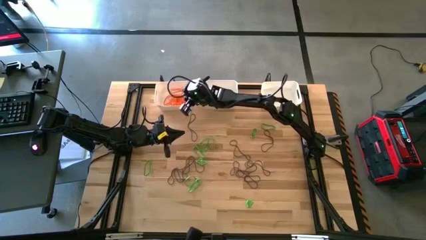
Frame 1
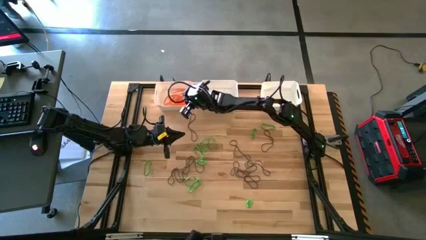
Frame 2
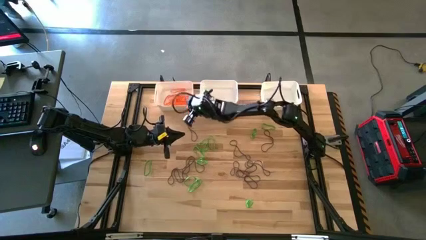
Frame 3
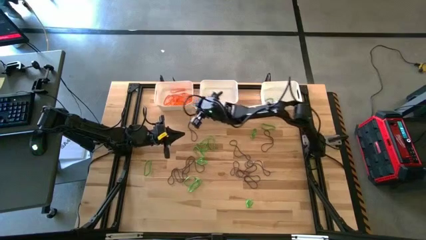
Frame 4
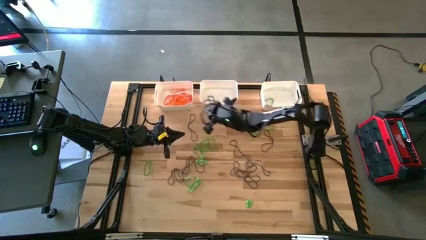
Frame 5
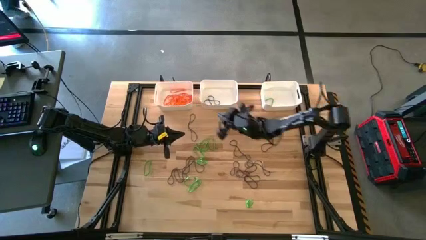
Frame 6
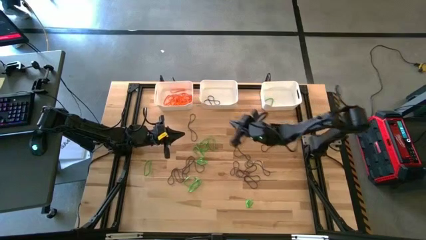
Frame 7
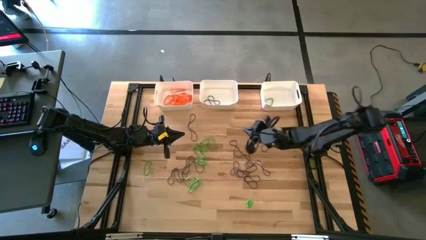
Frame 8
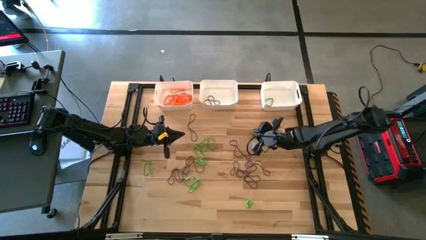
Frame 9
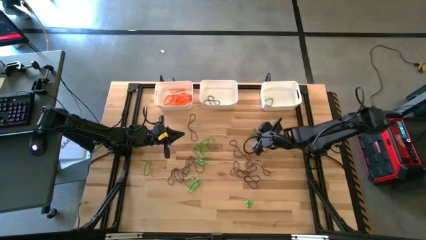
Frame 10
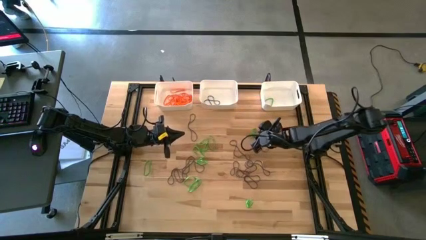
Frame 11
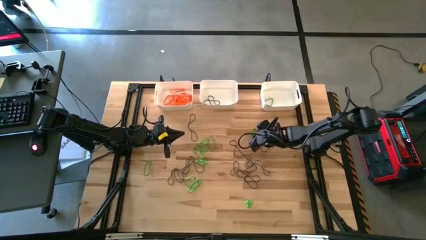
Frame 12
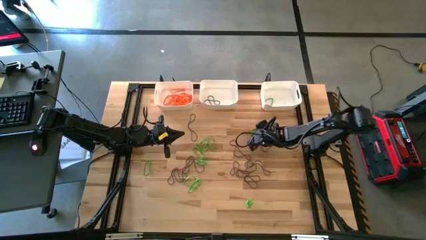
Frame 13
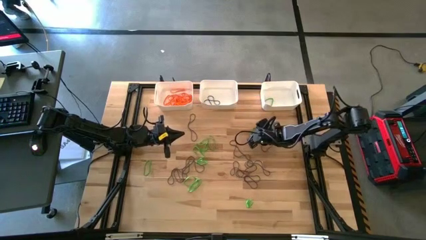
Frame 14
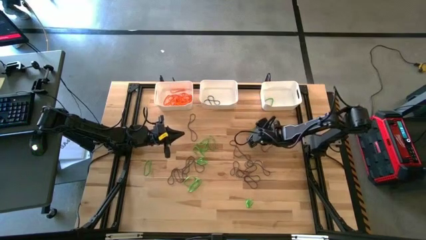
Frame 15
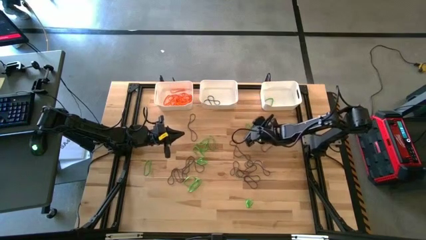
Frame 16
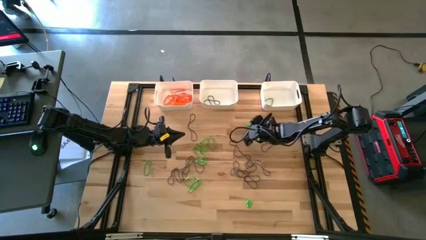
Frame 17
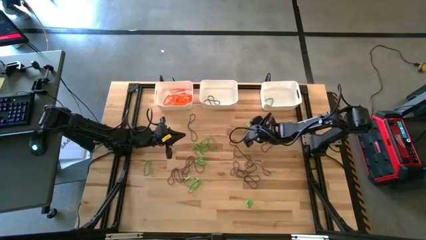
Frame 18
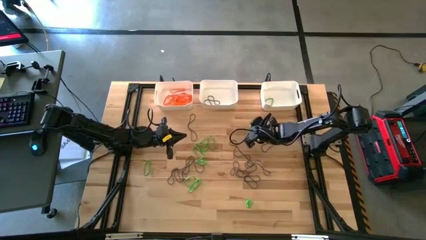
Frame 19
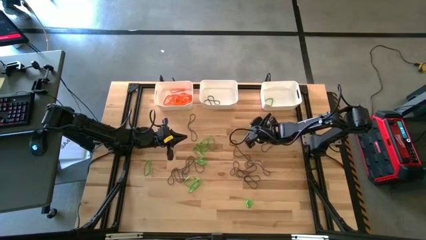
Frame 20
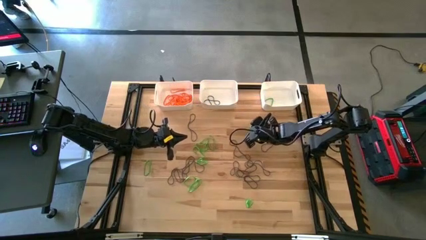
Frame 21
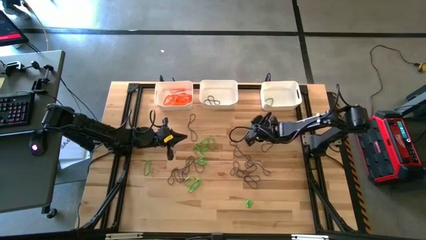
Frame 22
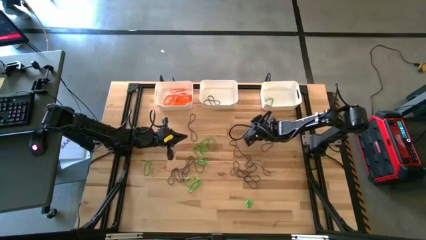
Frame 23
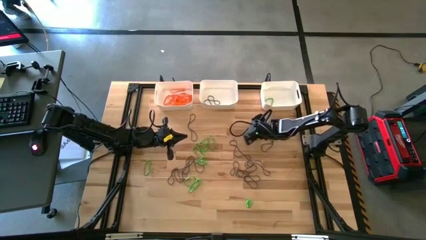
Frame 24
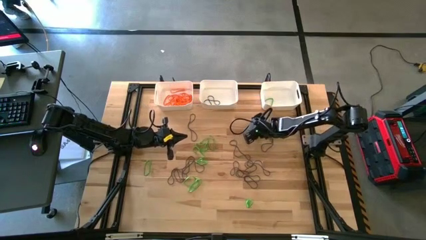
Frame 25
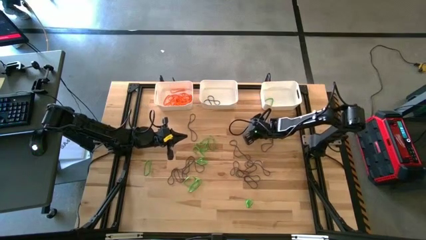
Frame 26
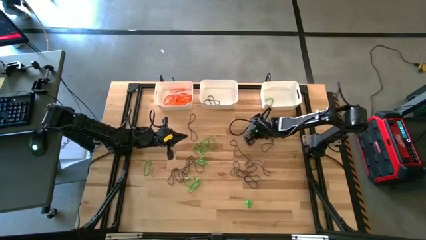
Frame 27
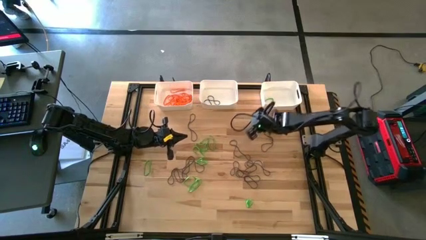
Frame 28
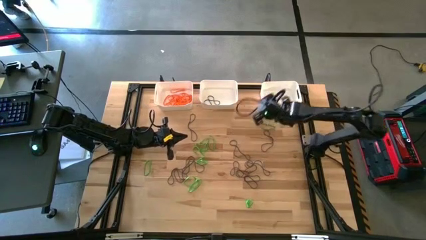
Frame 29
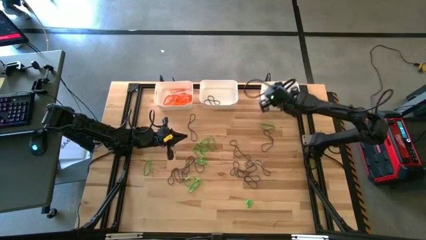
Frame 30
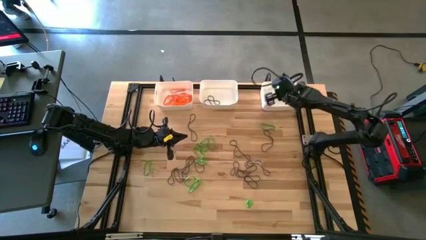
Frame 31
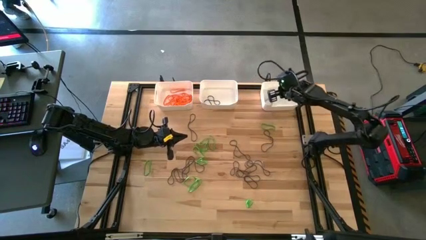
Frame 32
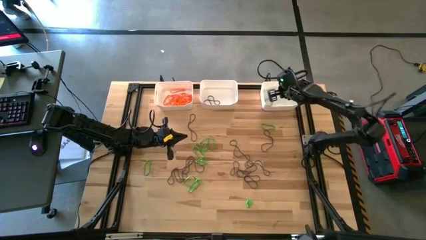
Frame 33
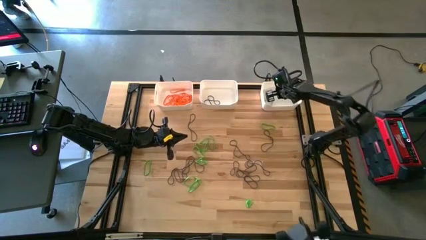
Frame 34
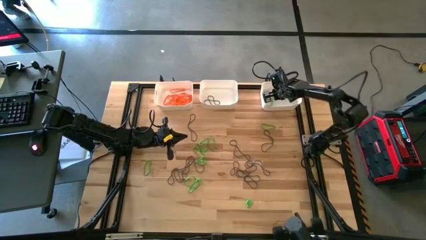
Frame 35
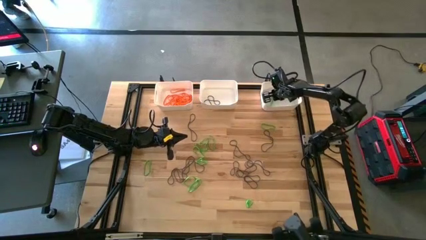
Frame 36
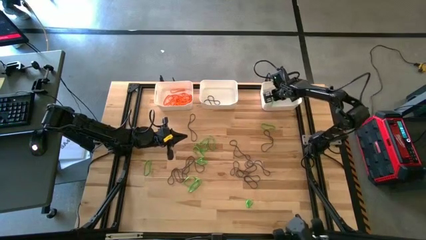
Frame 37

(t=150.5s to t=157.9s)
Task: Sort rubber bands into baskets
Put the green rubber band into the right white bin

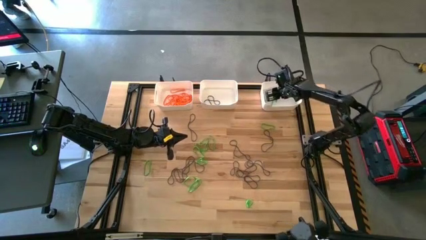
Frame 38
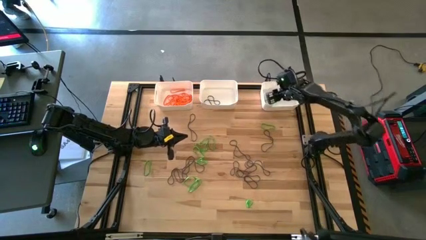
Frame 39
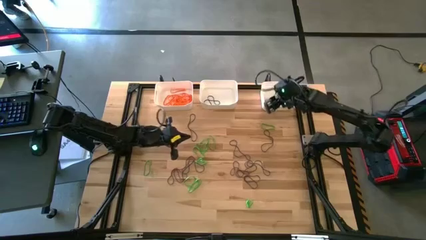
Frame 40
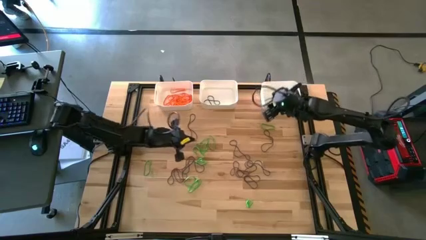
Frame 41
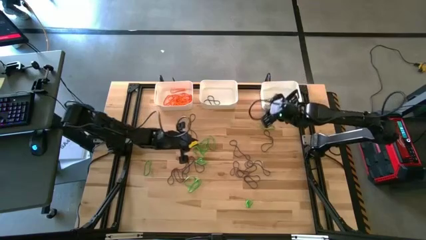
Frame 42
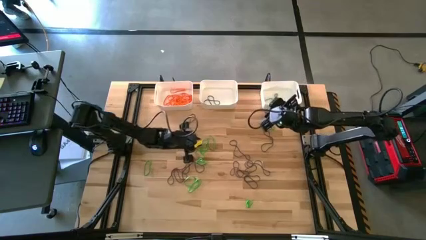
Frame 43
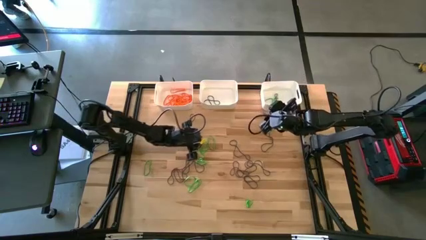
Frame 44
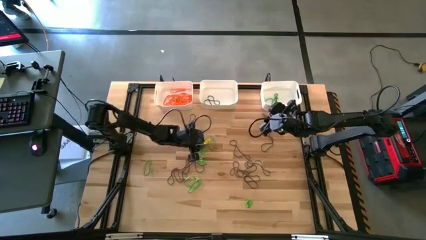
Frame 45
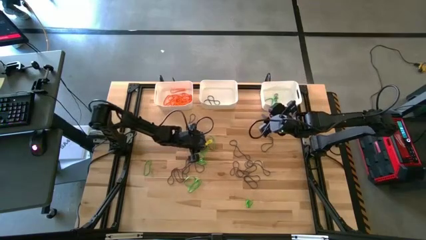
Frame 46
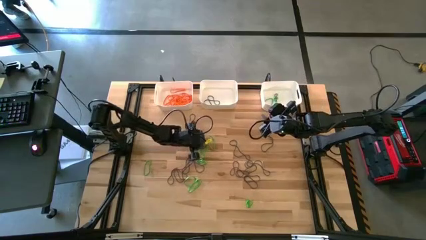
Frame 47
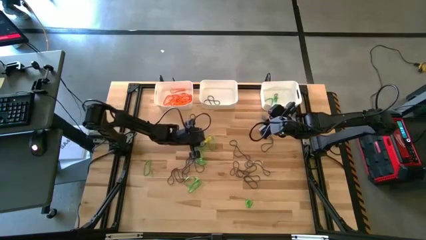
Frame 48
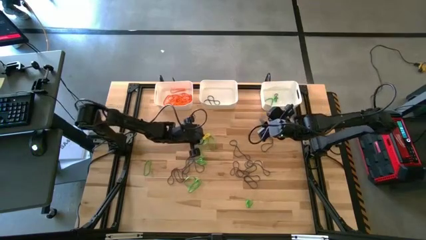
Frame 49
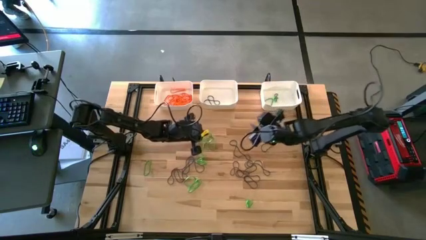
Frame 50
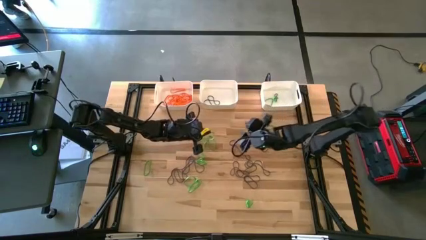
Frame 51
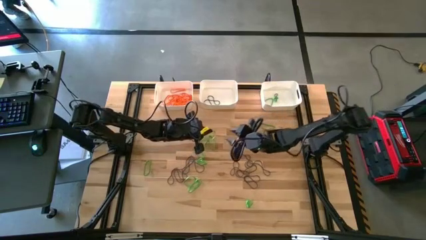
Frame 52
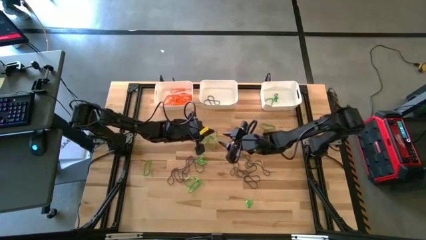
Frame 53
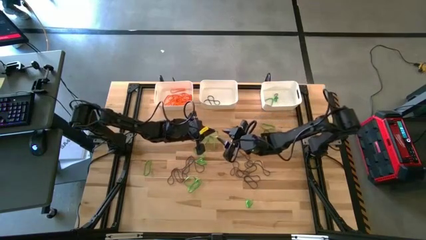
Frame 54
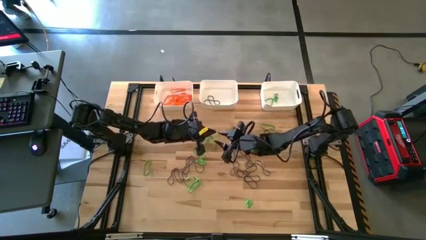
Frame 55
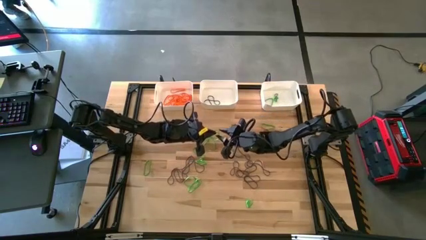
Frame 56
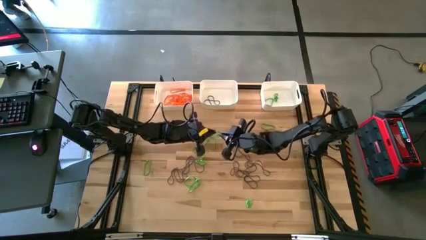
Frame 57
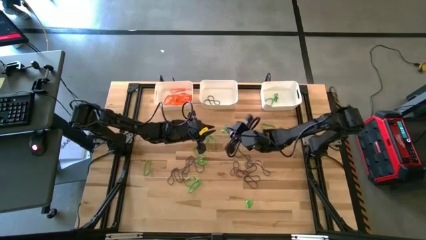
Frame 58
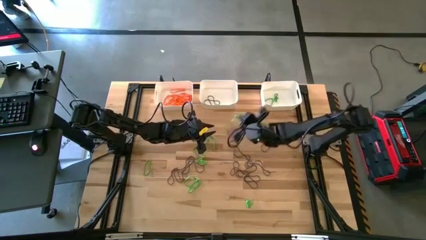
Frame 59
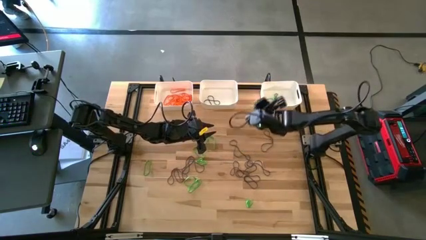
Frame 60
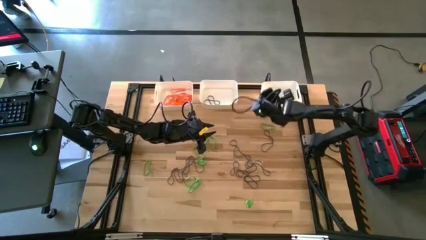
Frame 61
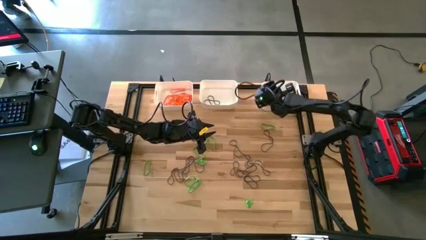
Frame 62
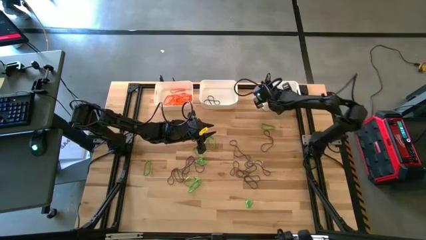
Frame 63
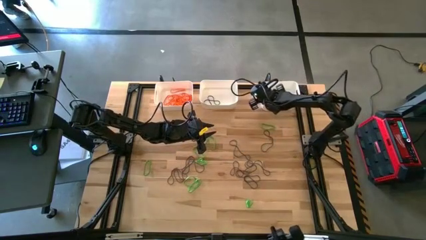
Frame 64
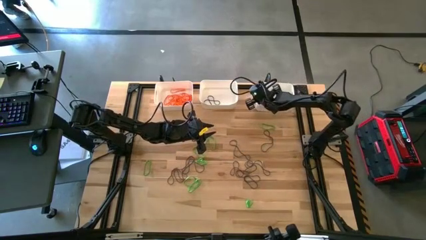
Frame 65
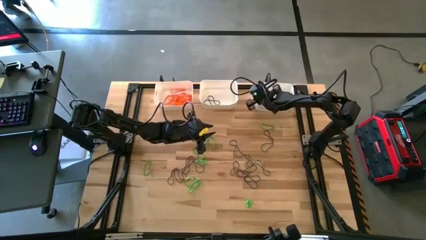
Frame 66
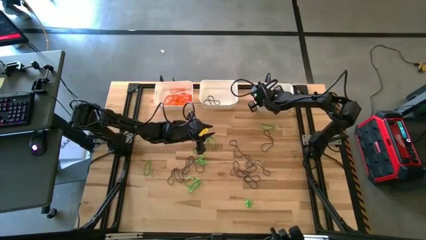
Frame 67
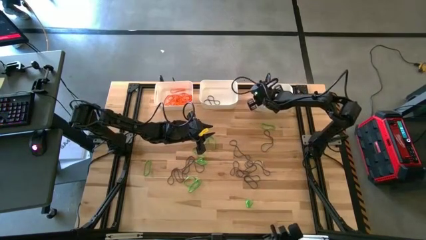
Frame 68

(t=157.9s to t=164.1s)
Put the green rubber band into the right white bin

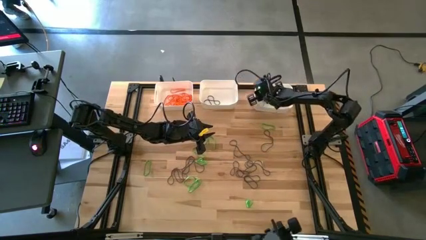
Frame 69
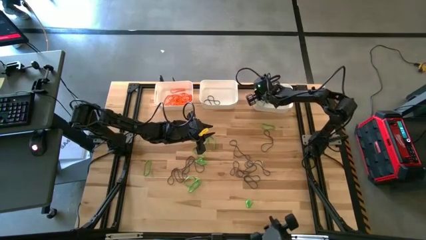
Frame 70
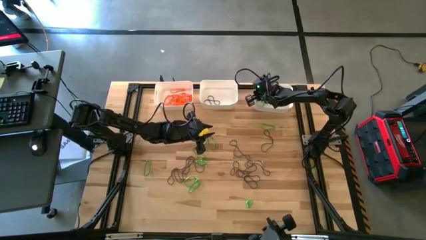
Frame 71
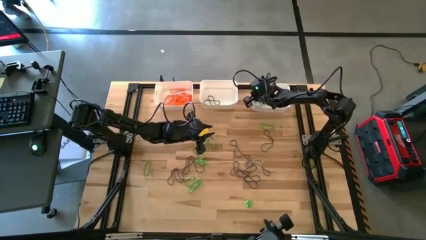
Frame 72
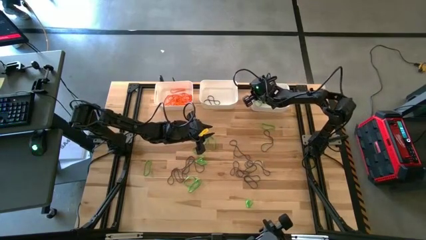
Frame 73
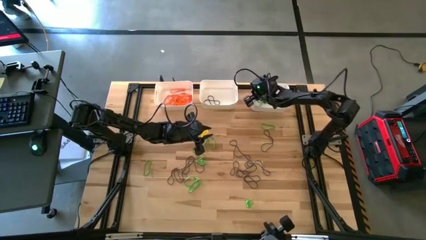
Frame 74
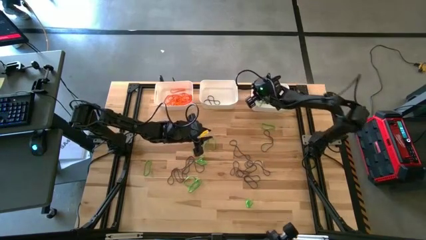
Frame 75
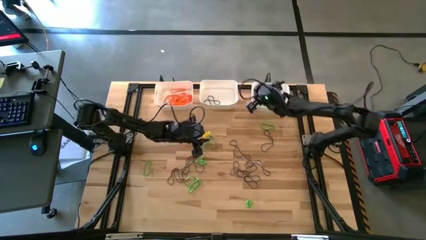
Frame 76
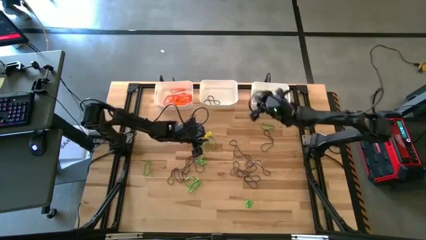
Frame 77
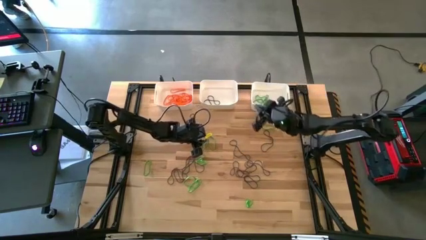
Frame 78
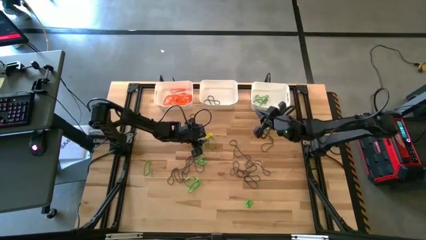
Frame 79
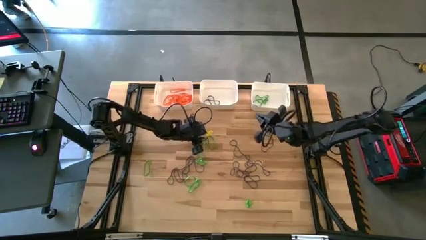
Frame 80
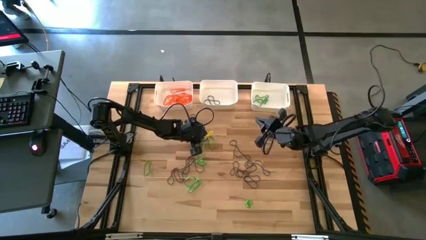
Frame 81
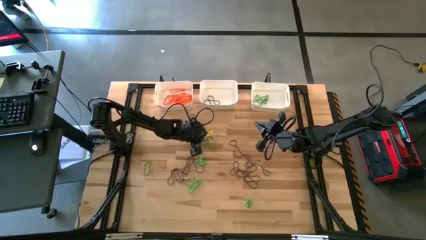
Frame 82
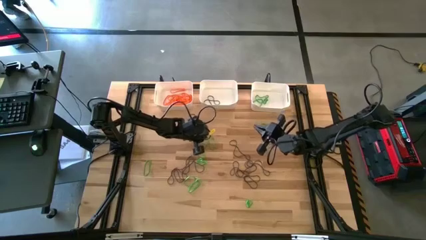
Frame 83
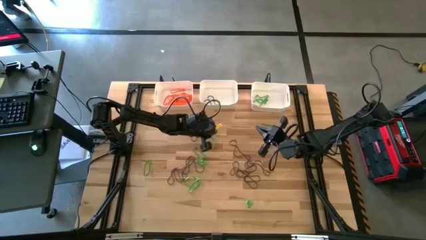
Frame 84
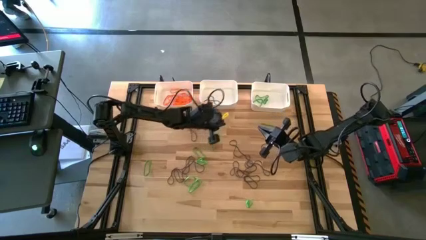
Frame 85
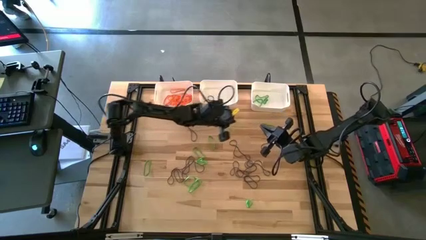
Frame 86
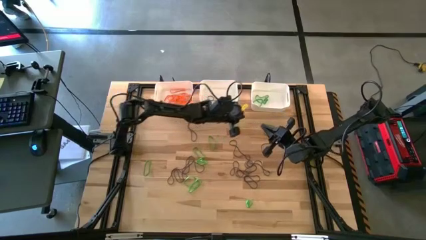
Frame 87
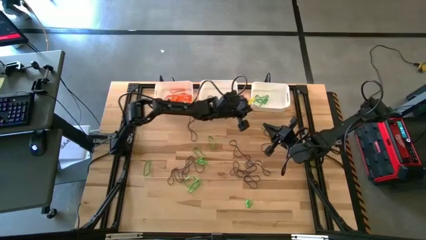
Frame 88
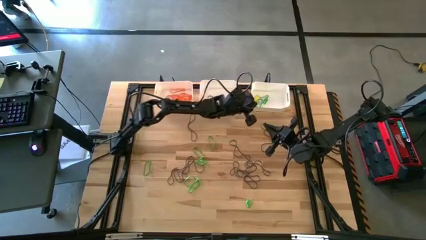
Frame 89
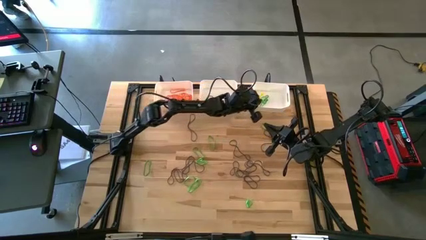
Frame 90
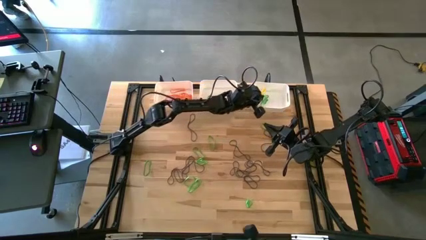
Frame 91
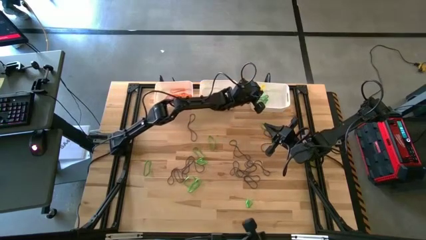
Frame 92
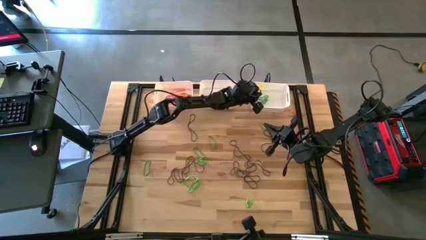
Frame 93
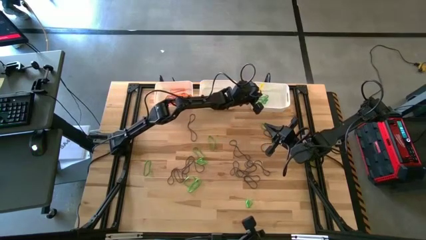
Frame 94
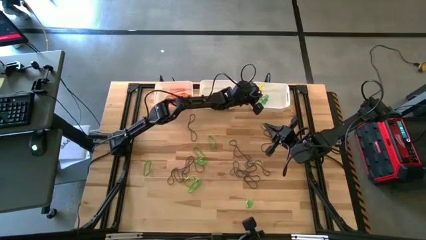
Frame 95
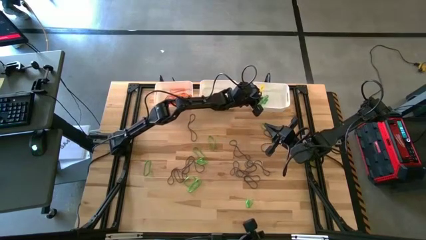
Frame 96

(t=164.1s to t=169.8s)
Put the green rubber band into the right white bin
